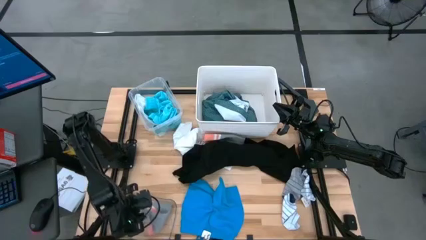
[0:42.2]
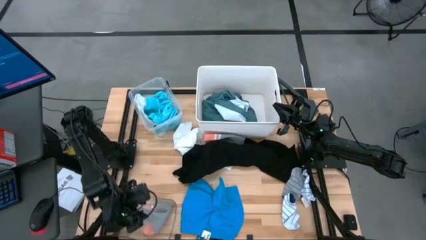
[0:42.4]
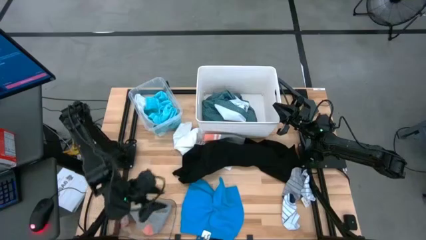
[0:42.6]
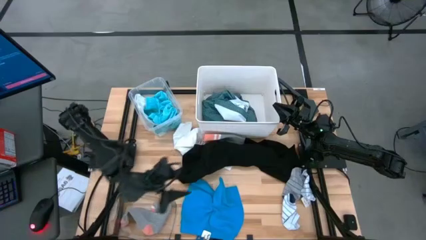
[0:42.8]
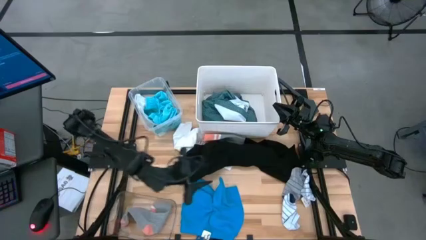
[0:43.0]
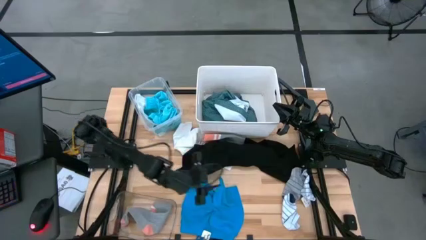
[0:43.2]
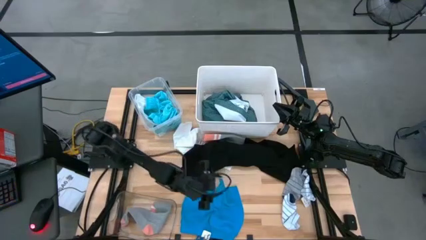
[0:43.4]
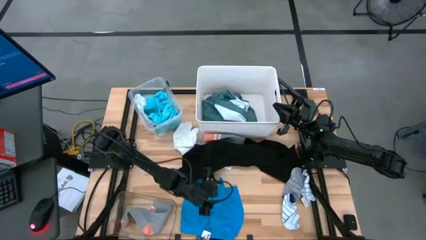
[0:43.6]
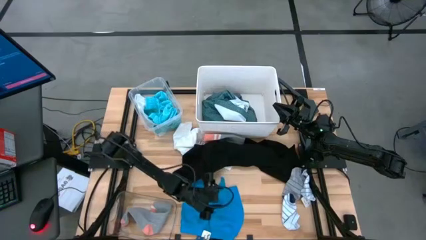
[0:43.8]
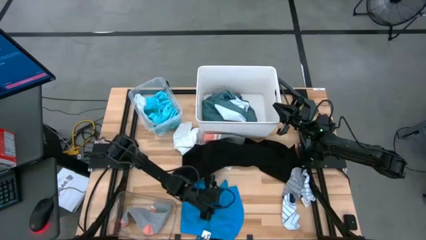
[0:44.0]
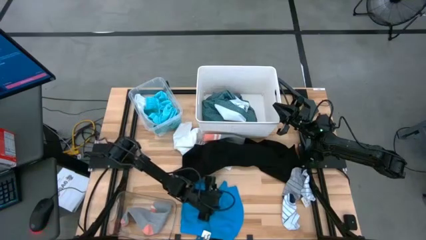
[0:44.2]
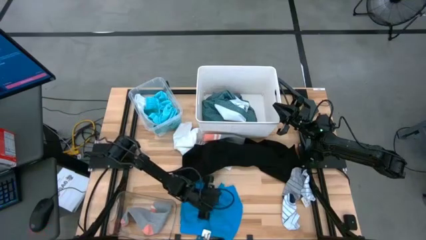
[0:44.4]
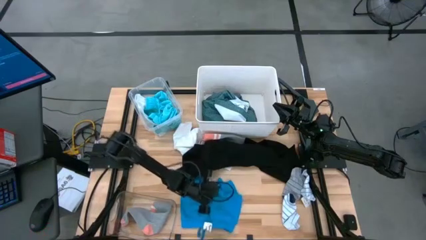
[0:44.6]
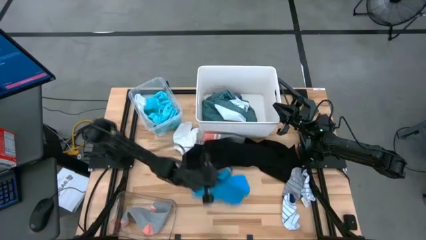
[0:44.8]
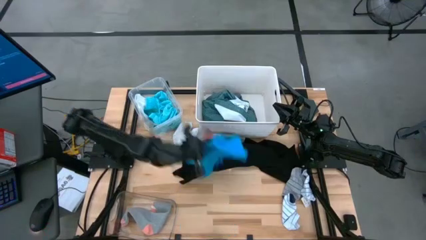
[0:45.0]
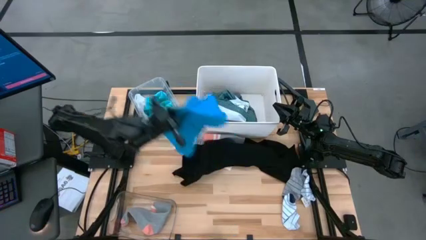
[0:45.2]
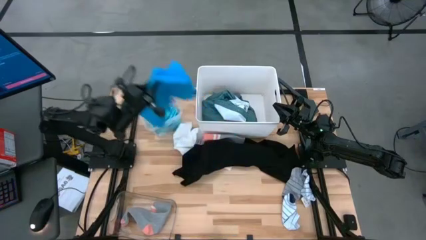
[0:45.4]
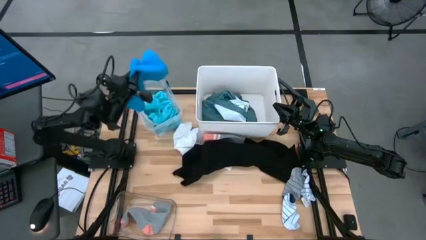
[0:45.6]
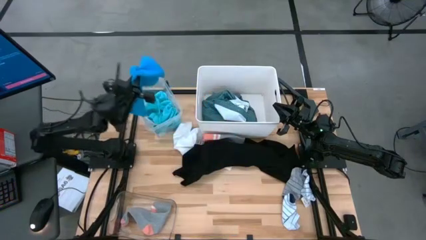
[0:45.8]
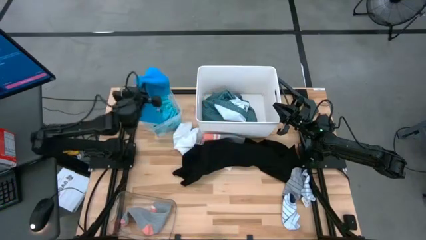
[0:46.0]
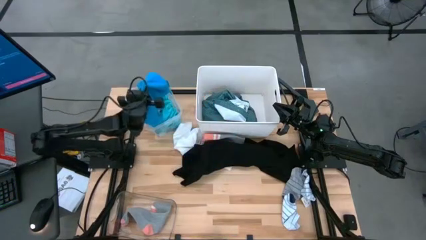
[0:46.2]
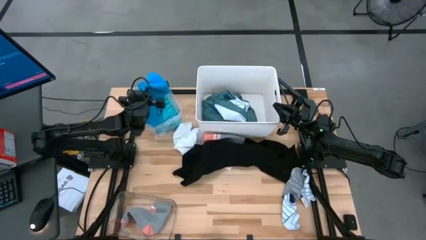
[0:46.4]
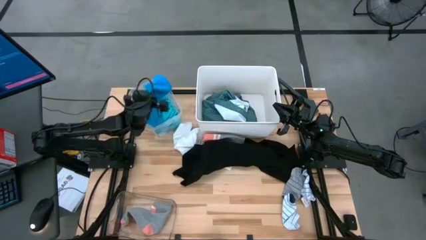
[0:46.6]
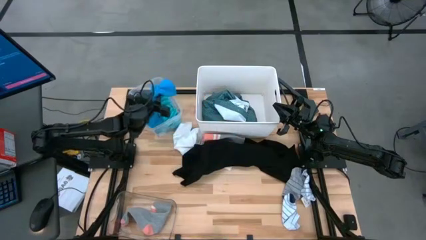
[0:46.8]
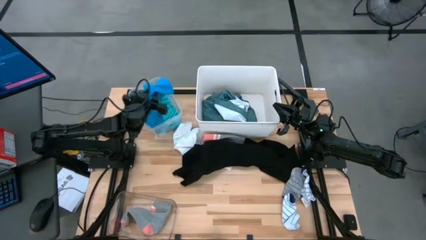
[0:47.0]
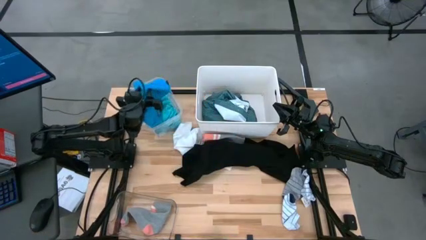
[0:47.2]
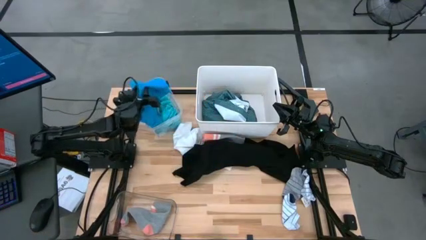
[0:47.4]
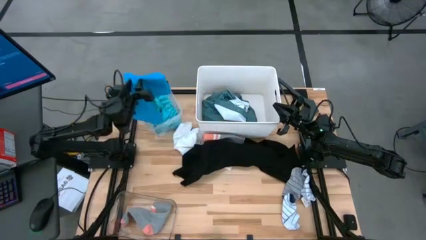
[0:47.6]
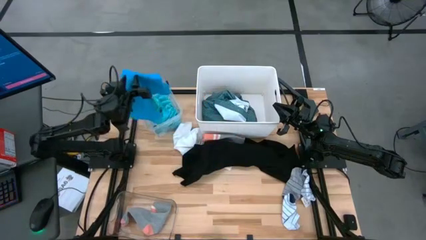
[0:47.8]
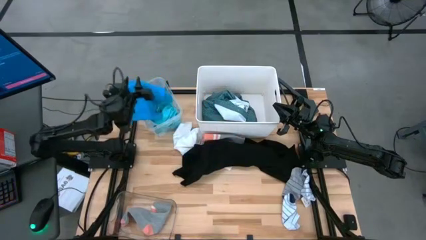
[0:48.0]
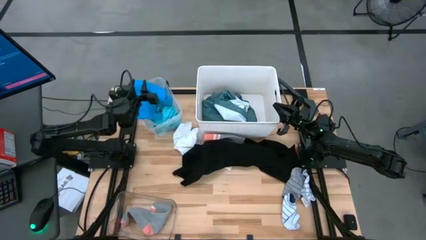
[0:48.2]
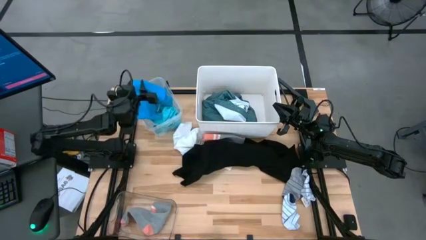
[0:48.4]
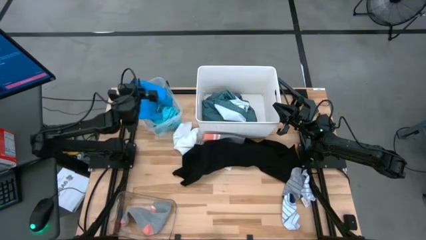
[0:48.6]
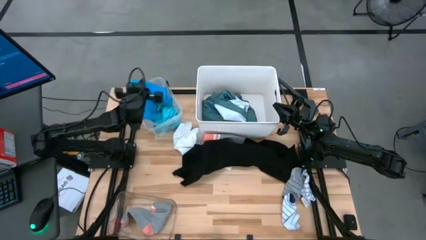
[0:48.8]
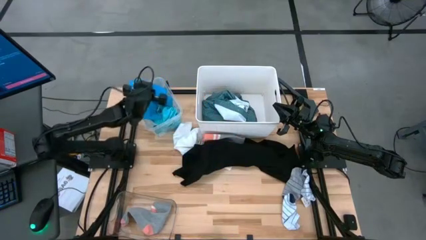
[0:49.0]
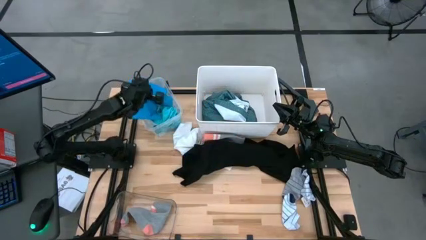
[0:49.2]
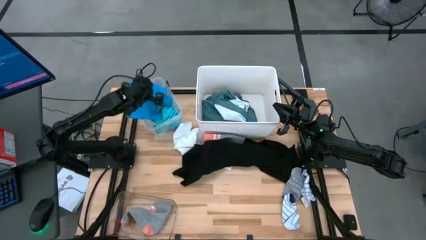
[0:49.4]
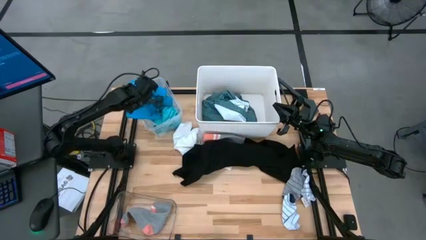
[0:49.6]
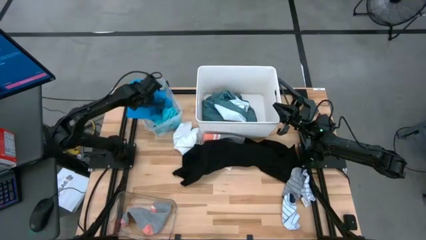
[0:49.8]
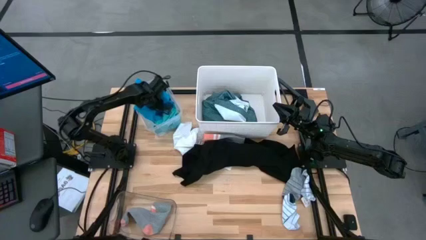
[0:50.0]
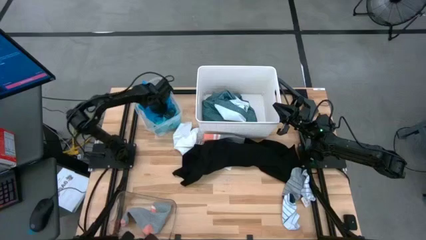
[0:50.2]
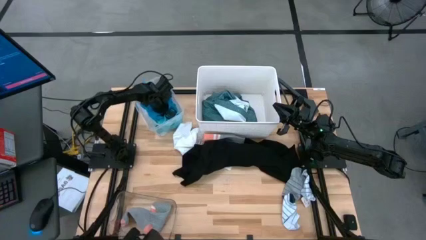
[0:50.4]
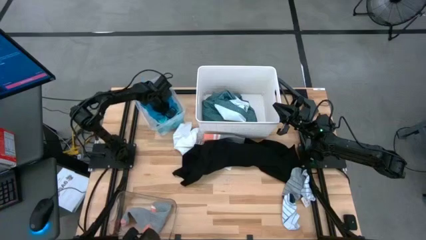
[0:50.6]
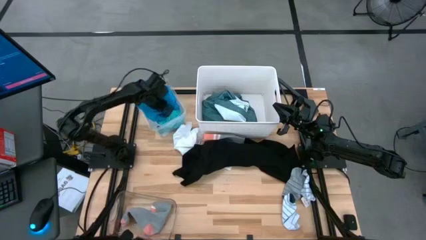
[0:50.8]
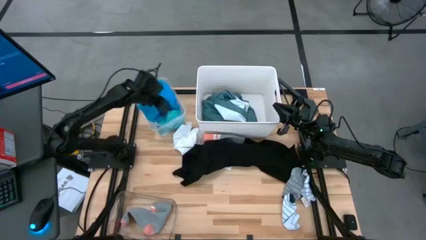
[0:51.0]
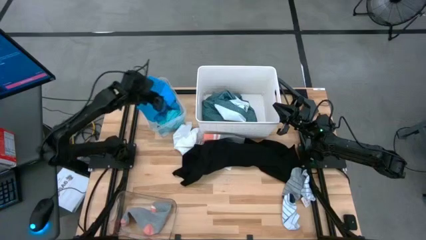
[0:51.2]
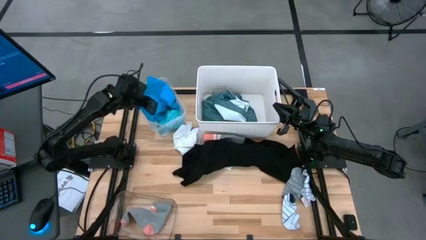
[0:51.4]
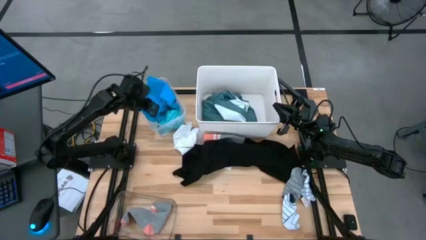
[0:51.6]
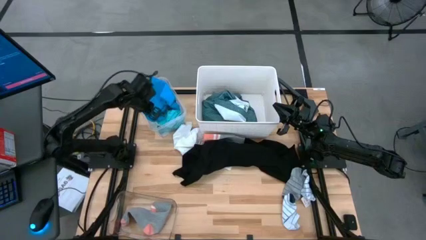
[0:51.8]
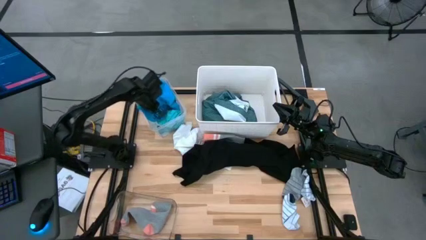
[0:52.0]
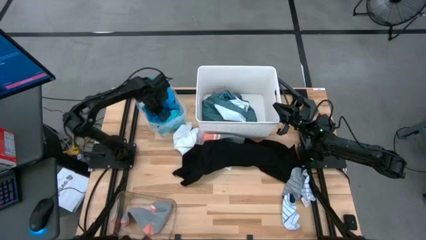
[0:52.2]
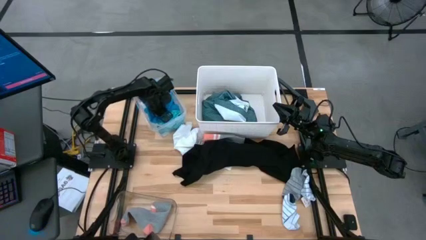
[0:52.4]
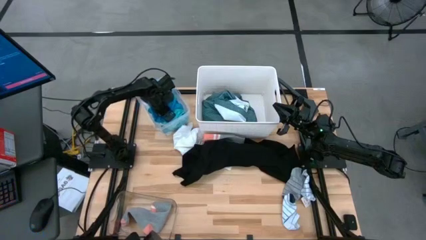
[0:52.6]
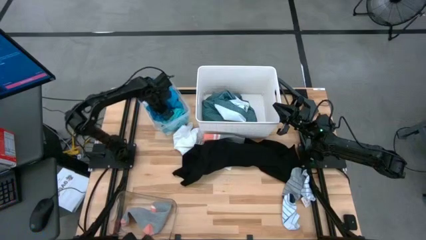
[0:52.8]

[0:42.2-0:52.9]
Task: Pick & Place Cloths
Put the blue shorts into the transparent container

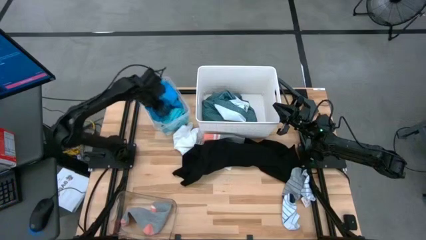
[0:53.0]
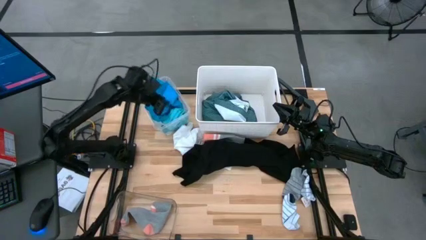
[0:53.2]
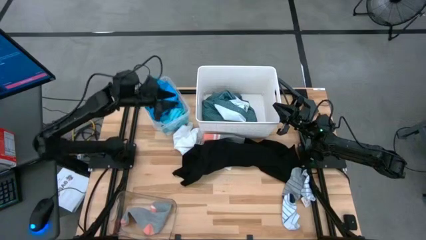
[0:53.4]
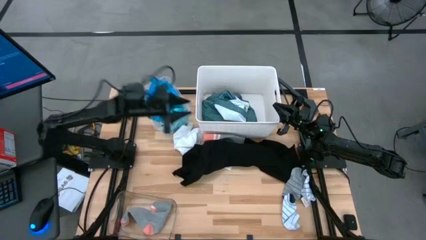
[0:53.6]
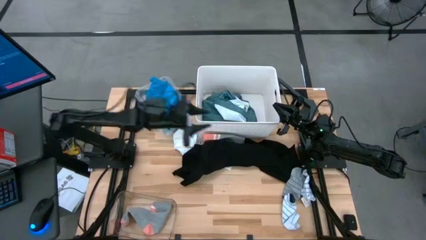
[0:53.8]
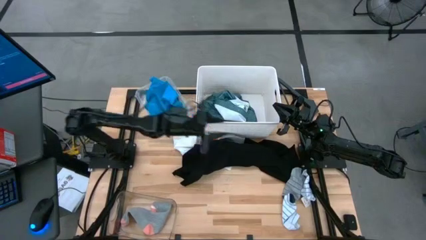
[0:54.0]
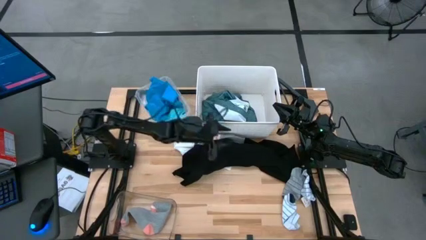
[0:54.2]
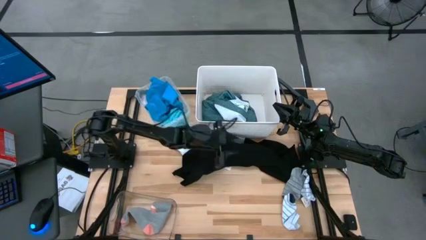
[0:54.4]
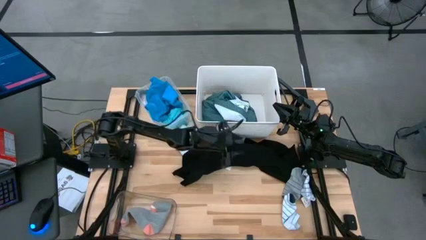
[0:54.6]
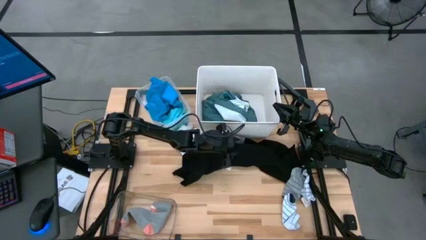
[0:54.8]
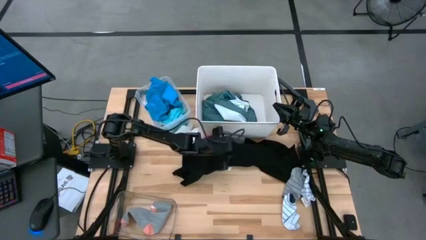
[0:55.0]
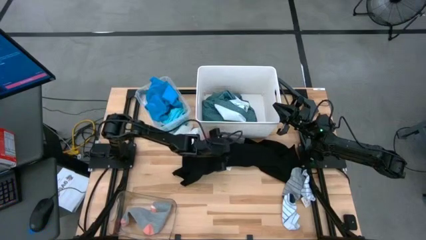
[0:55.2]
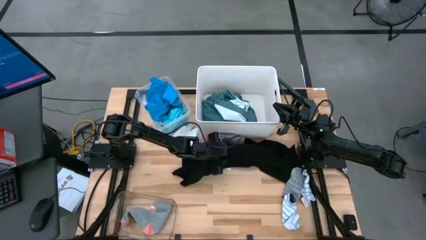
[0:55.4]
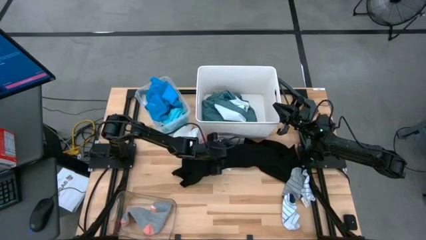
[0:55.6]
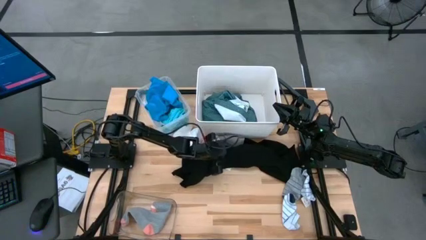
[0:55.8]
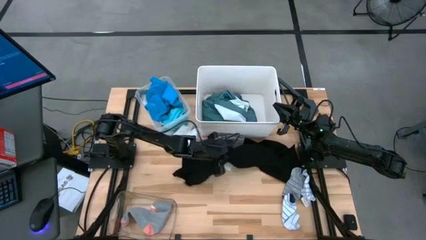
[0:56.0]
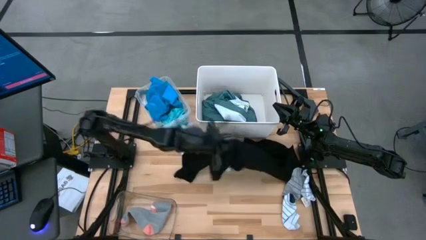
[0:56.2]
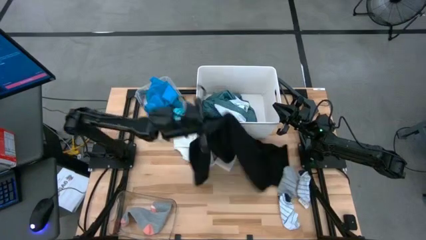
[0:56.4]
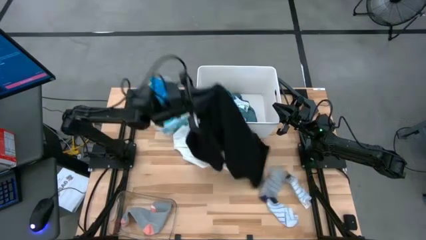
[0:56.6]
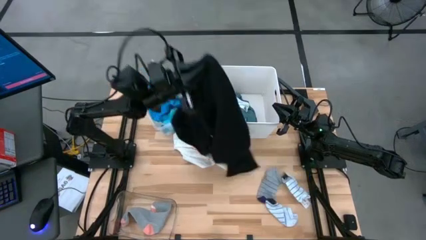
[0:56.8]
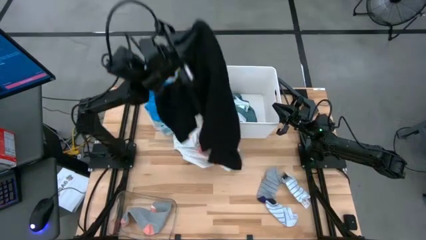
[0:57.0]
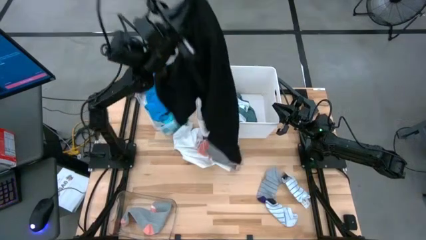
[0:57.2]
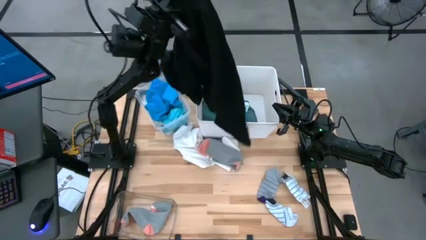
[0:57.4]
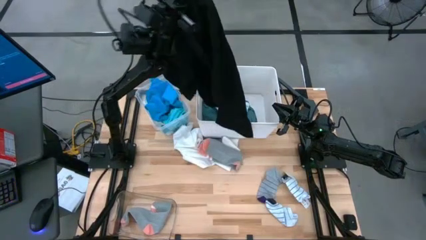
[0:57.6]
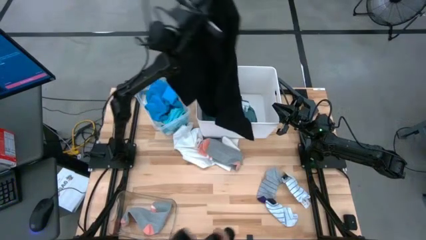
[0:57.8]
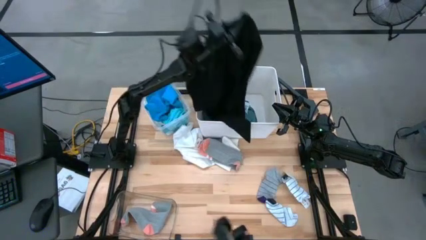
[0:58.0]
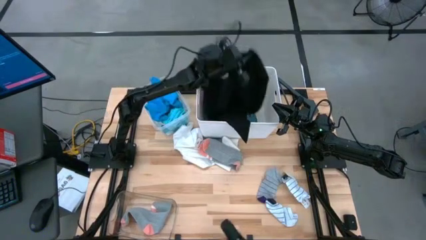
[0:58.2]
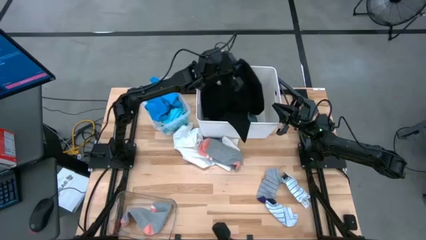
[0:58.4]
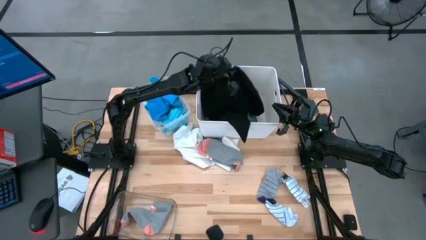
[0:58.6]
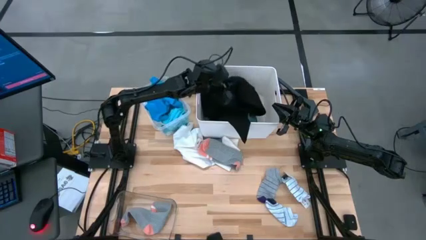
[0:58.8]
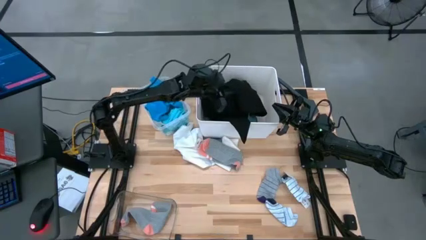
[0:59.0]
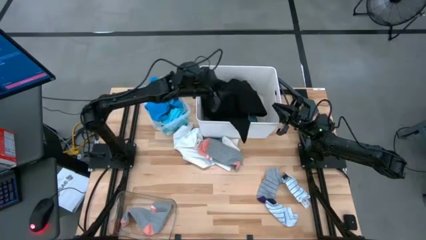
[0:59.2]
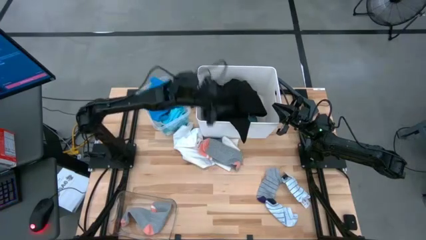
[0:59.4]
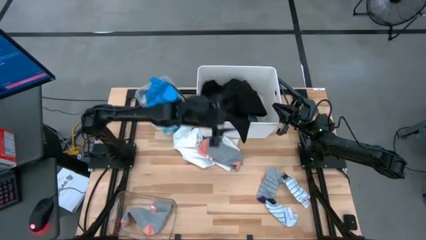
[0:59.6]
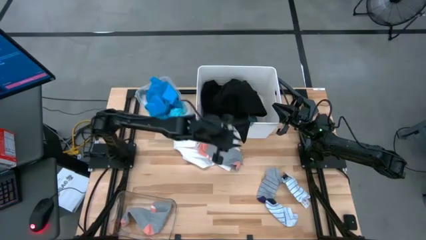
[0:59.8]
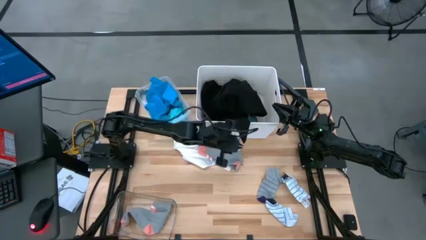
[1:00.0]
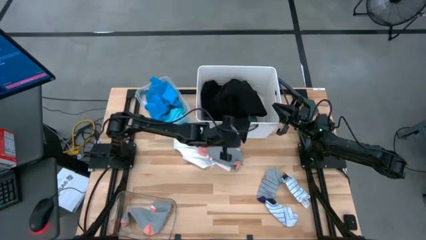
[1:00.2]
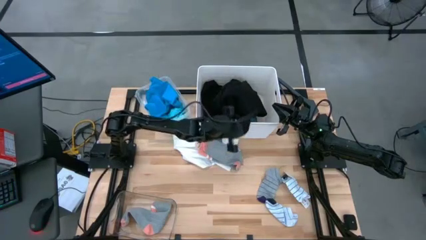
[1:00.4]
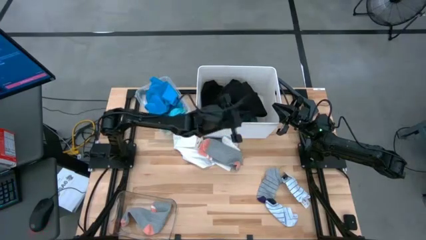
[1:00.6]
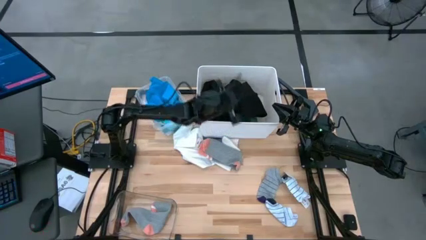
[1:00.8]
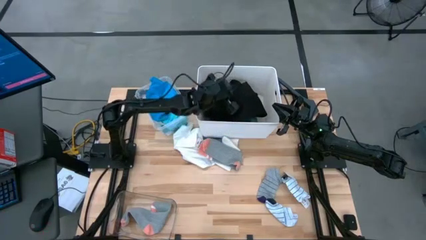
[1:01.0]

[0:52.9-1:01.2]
Put the black polo shirt into the white laundry organizer
